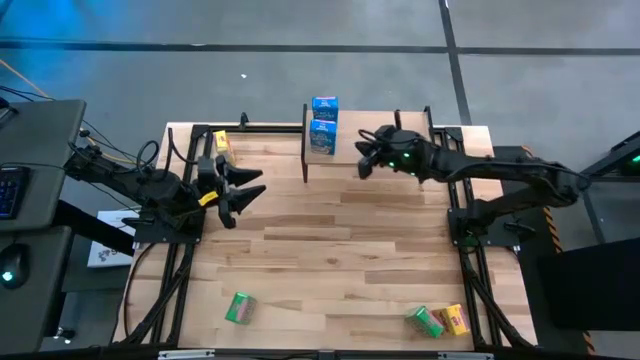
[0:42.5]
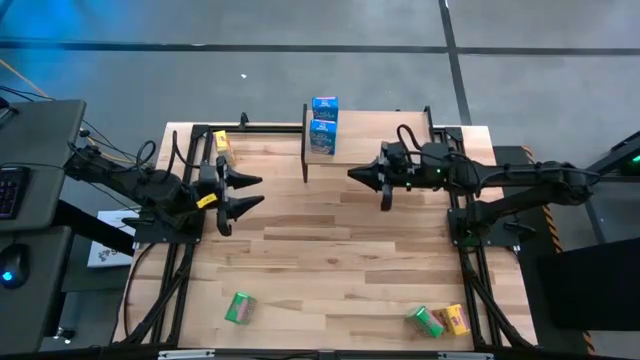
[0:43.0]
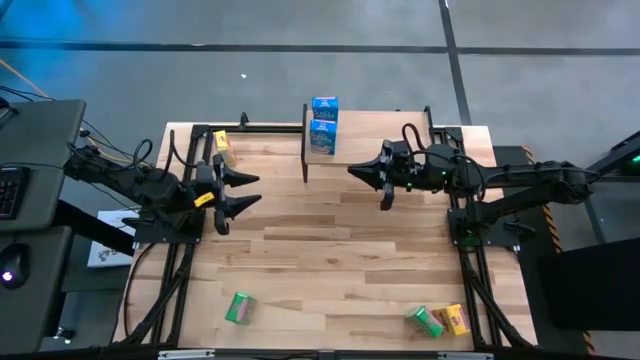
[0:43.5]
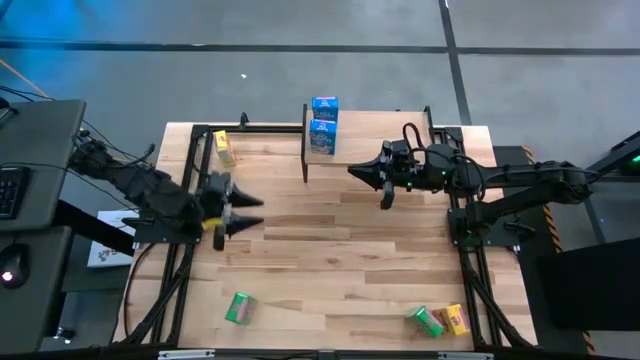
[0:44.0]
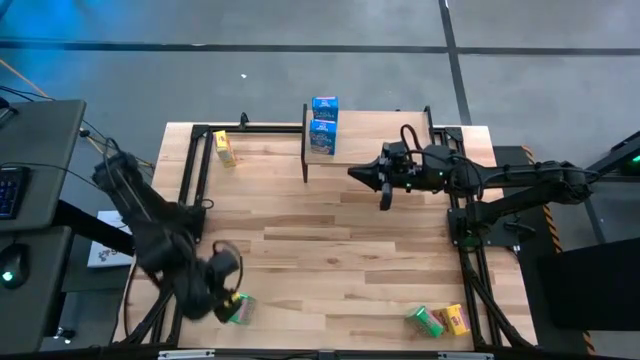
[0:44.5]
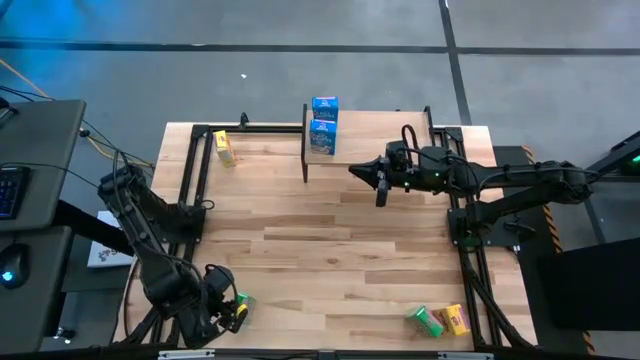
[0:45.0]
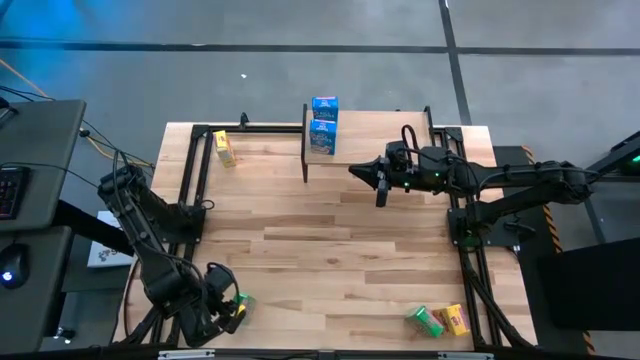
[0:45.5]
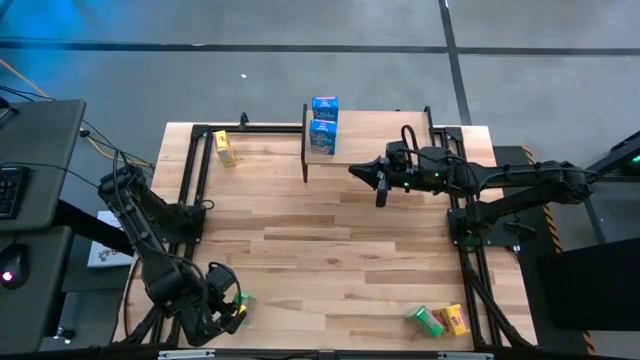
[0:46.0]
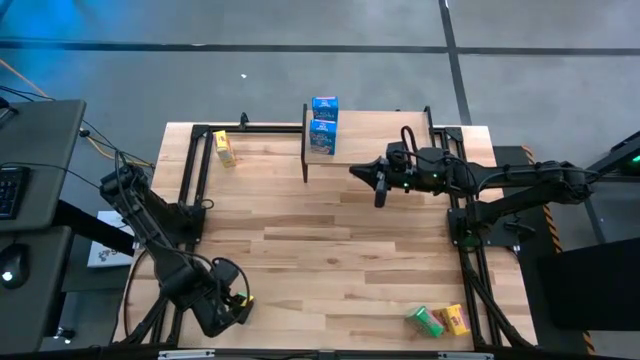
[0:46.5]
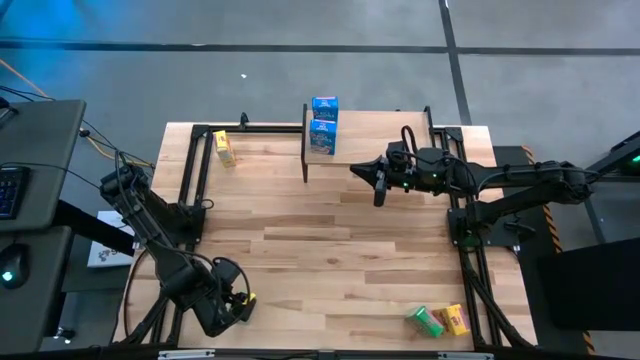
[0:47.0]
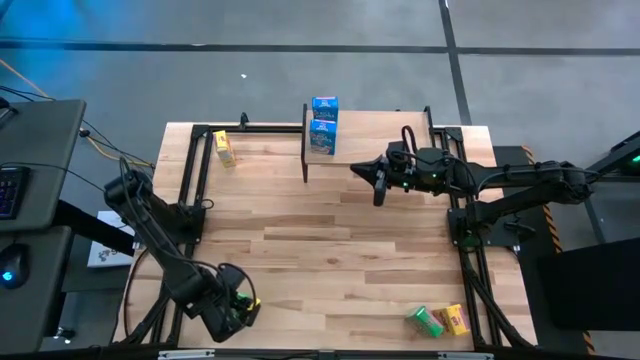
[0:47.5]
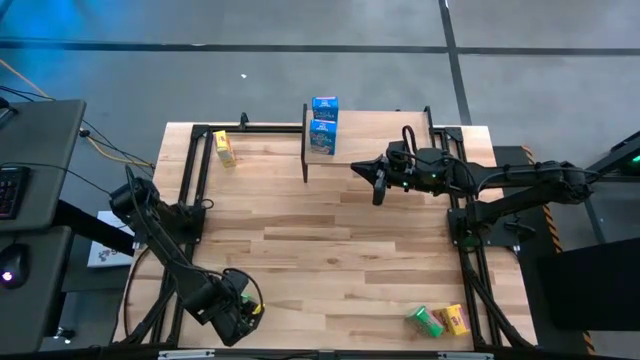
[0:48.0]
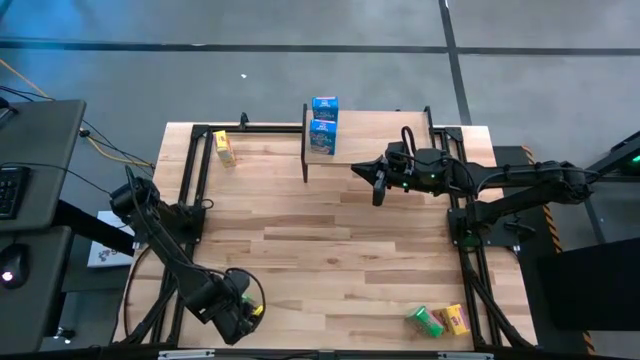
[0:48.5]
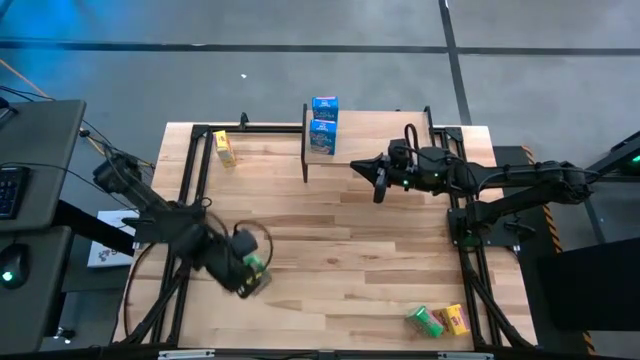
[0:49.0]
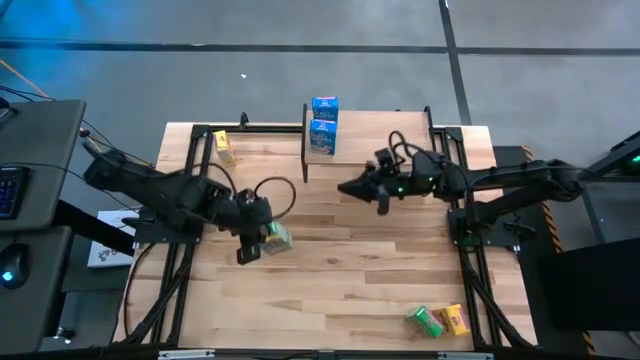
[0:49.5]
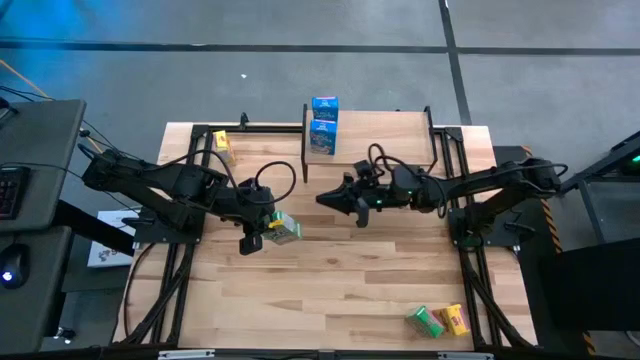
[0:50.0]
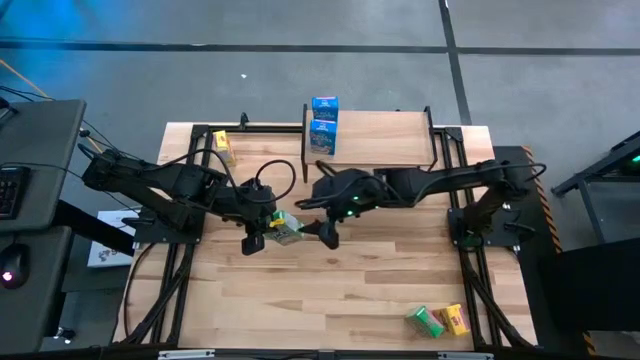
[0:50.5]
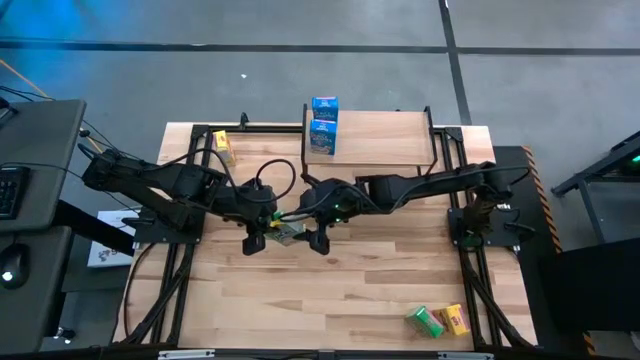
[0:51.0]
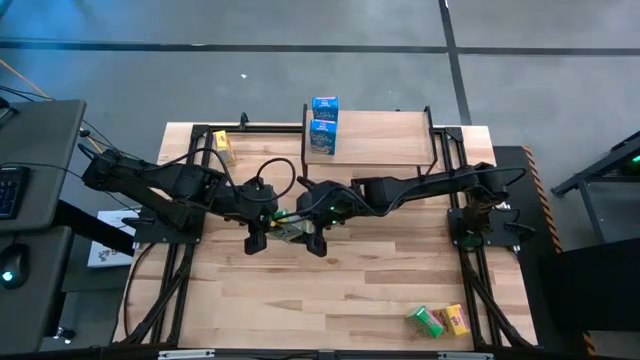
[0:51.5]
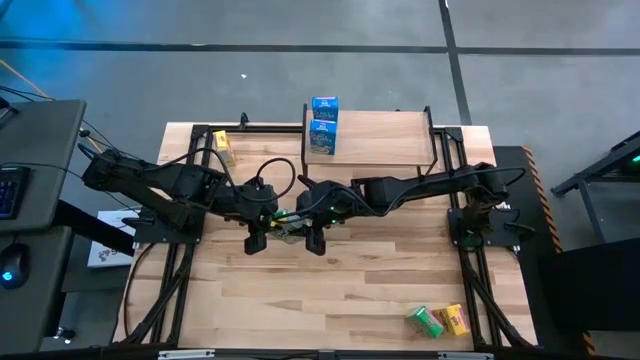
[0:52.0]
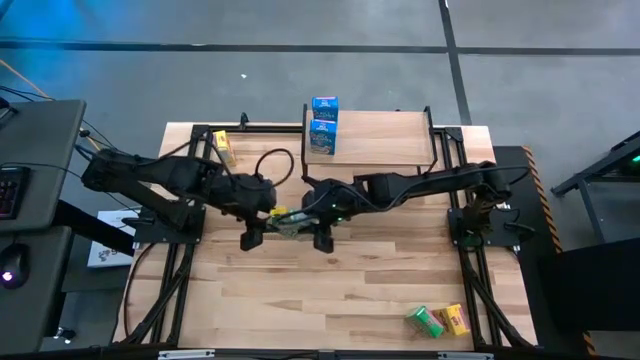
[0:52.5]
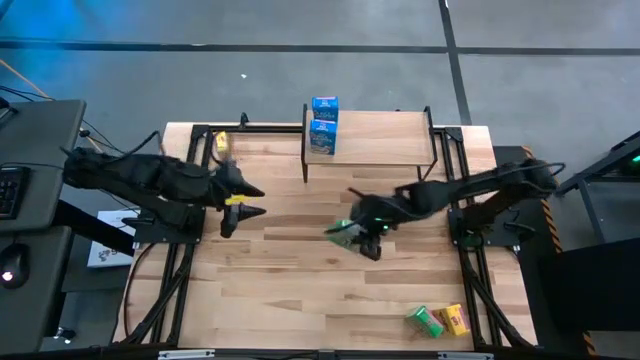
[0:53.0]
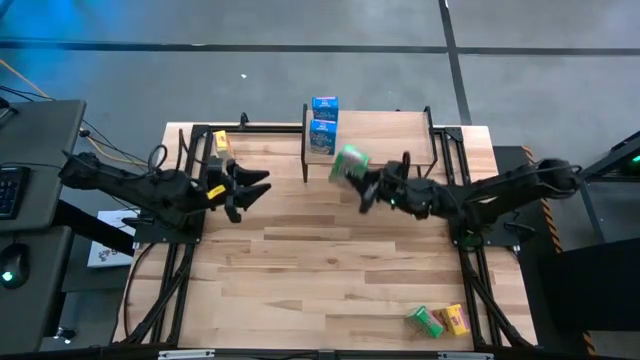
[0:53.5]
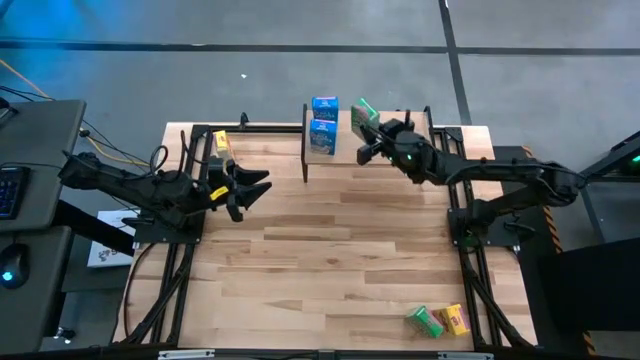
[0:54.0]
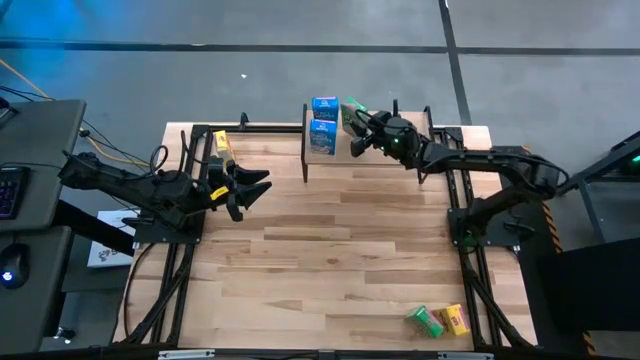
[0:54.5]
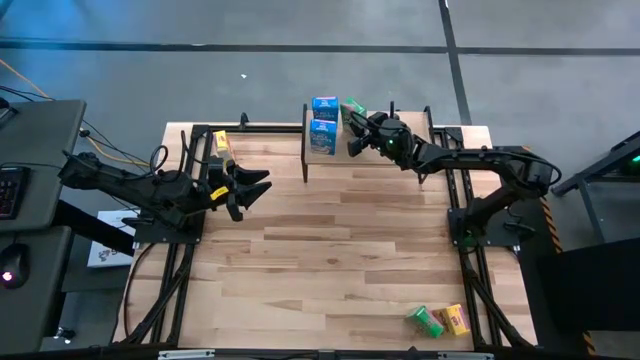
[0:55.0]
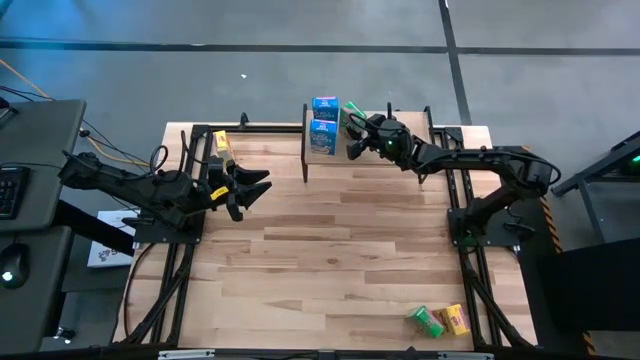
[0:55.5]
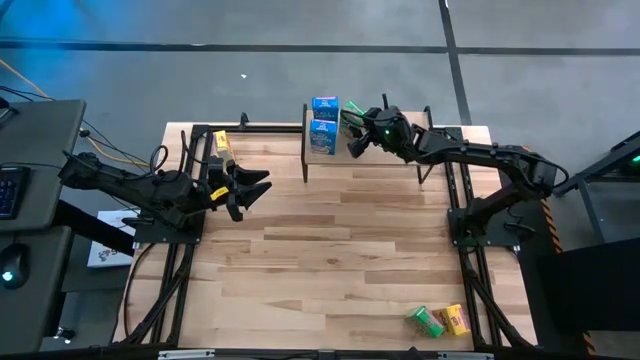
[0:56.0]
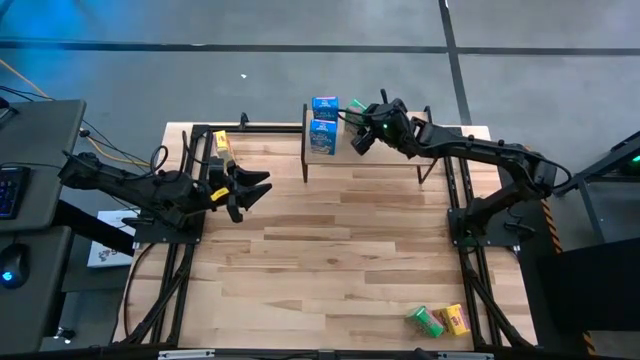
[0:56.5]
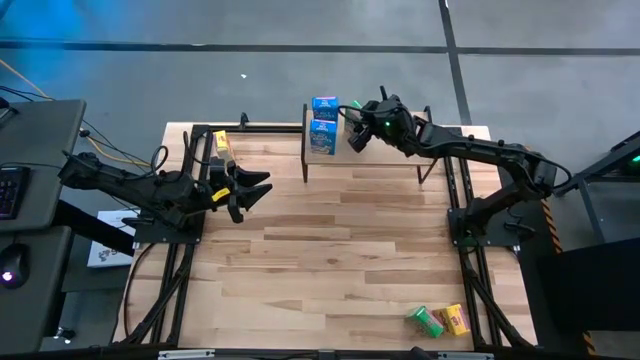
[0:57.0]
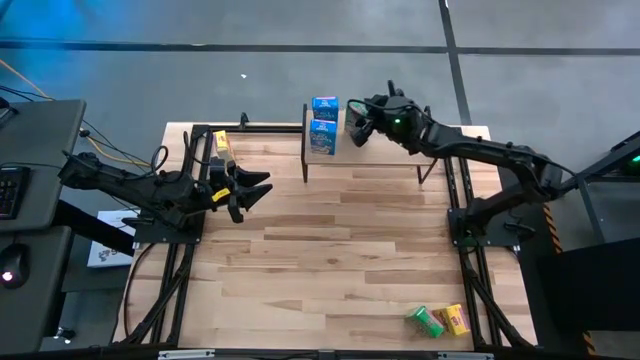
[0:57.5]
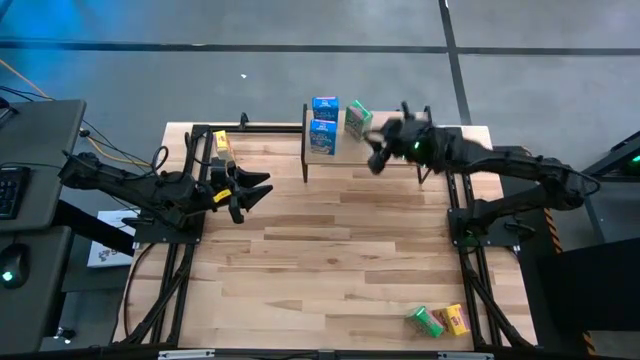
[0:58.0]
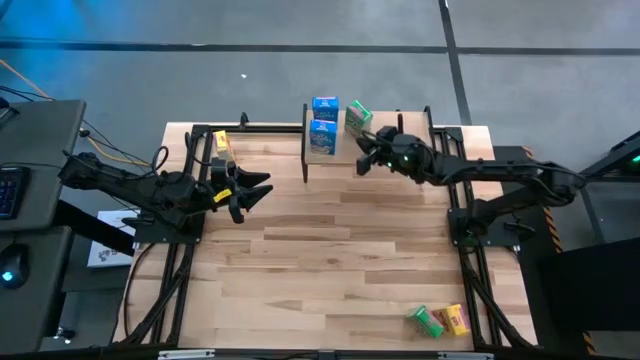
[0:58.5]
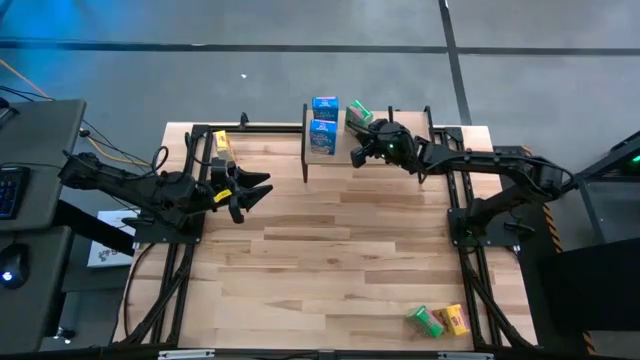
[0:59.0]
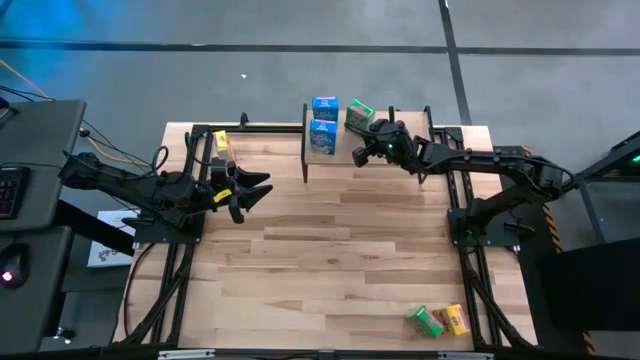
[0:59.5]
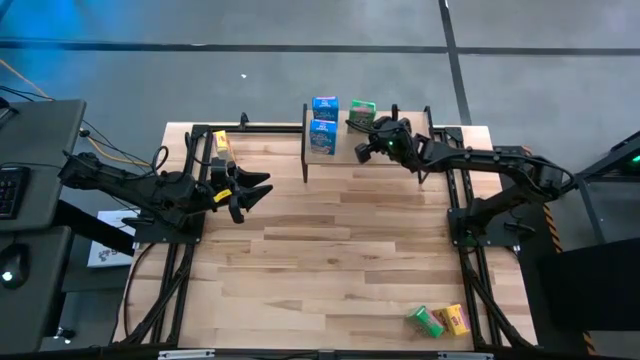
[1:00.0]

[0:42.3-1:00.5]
Task: Stack cereal on shelf
Put the left green cereal box on the shelf

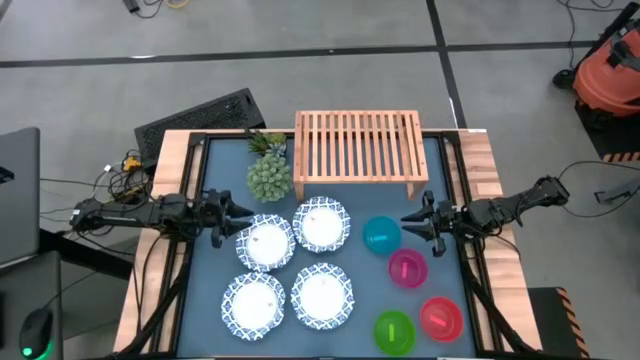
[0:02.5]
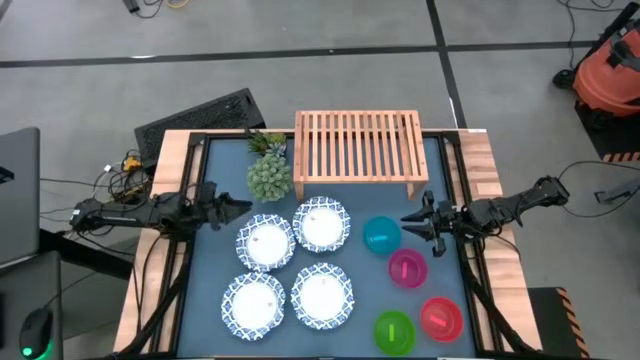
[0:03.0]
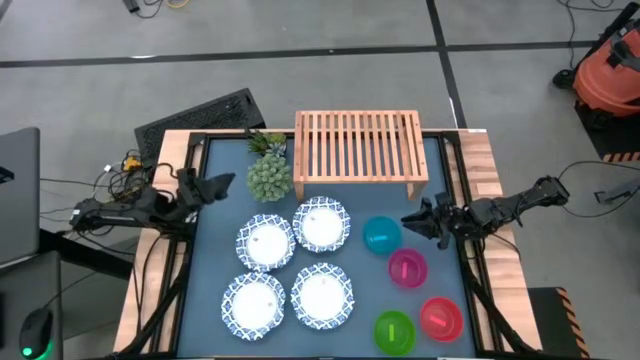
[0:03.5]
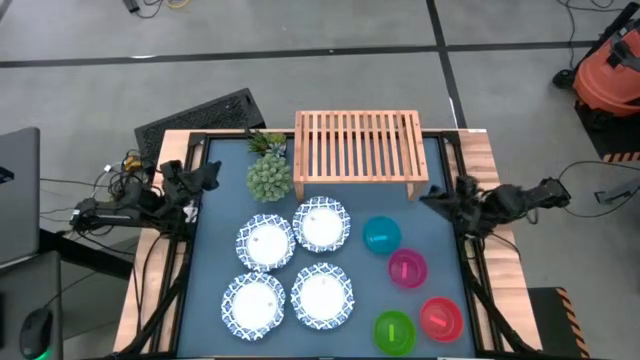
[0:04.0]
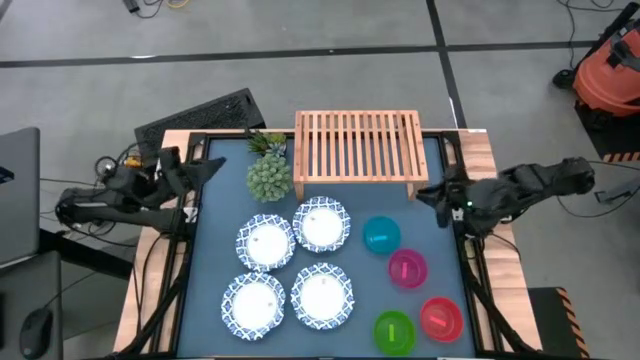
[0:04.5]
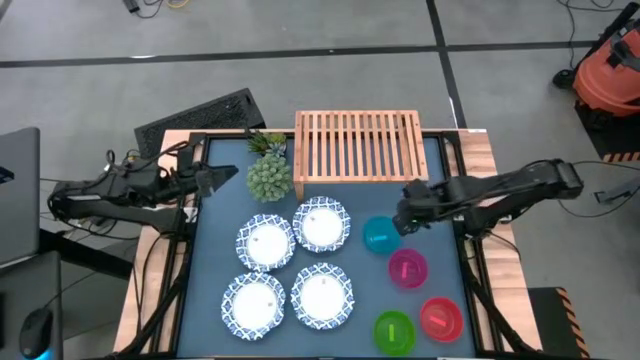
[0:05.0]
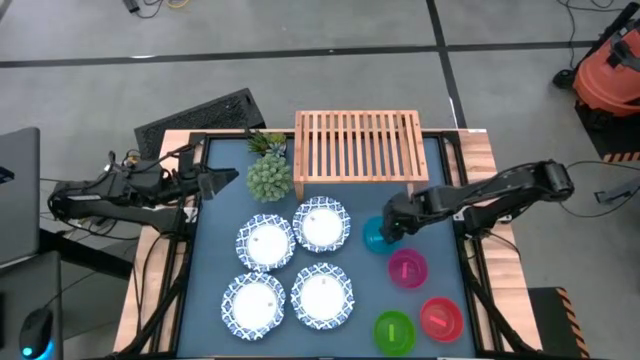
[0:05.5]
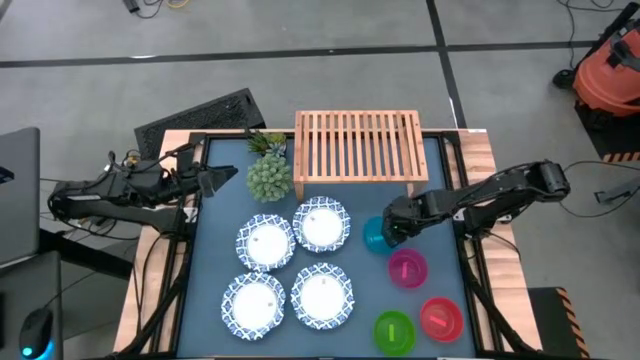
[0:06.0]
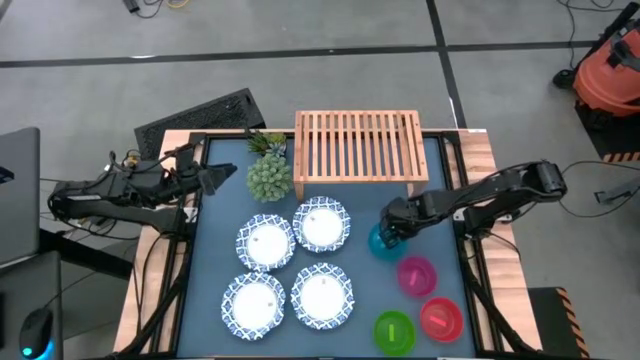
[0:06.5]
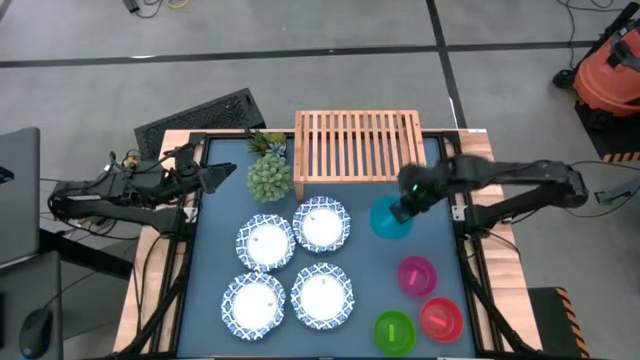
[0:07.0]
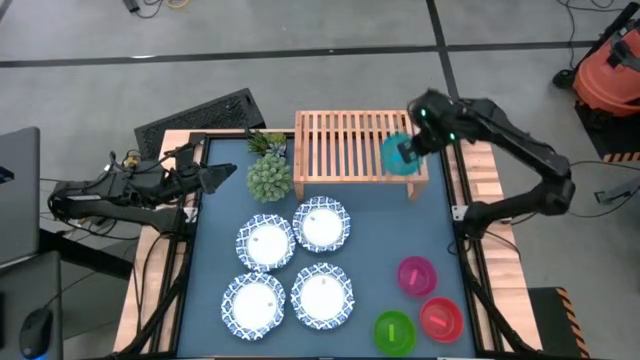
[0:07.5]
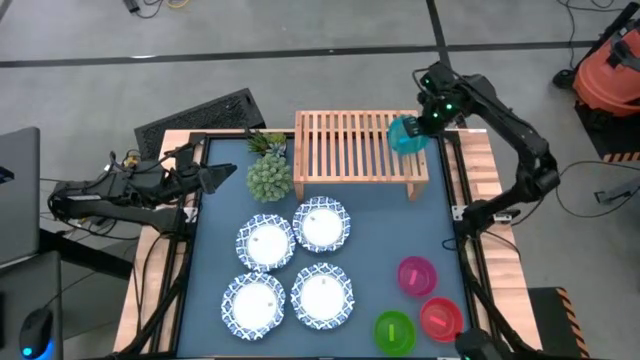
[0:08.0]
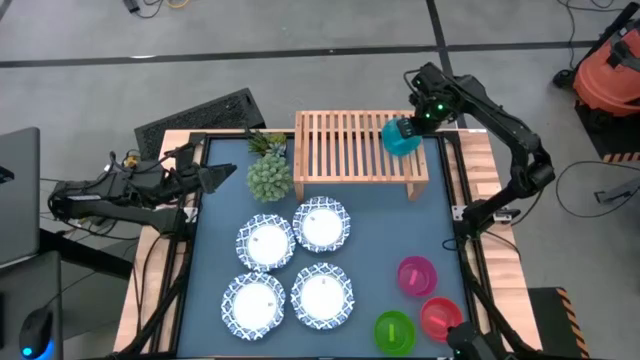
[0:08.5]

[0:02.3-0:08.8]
Task: Place and stack bowls onto a shelf
Put the blue bowl on the shelf
